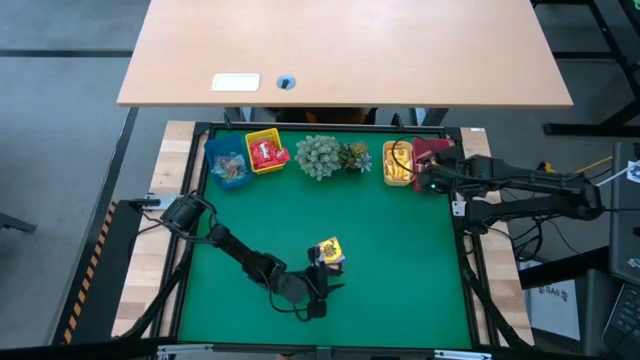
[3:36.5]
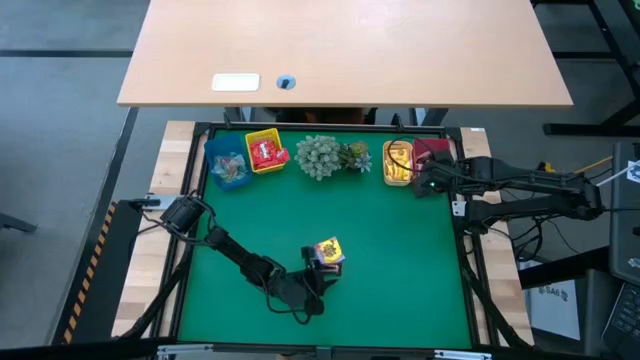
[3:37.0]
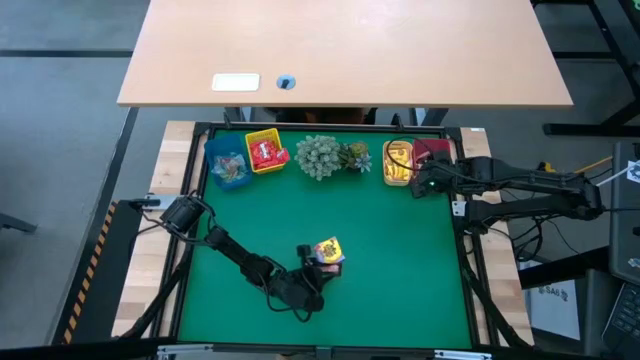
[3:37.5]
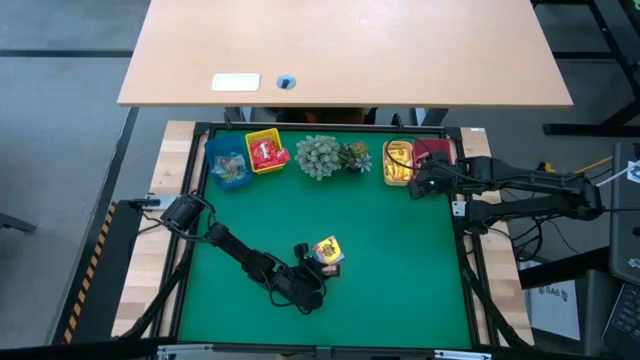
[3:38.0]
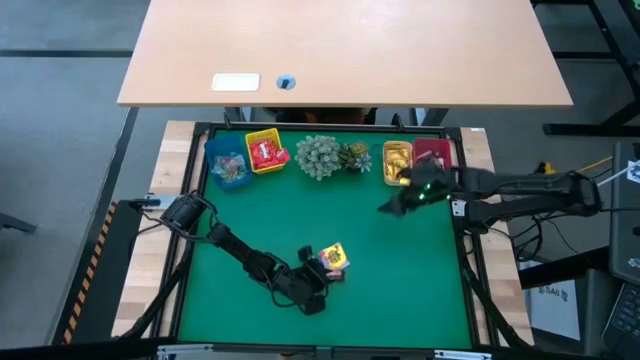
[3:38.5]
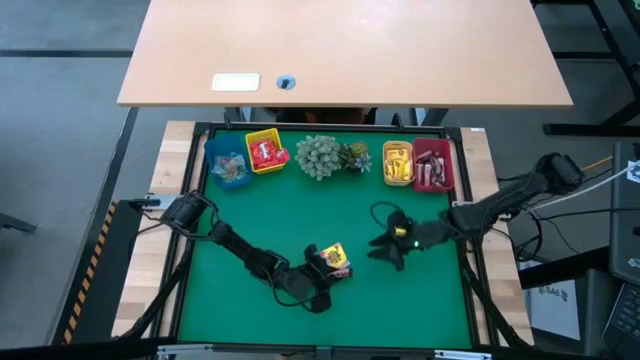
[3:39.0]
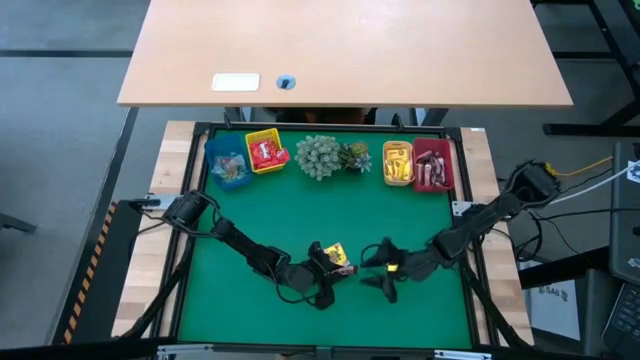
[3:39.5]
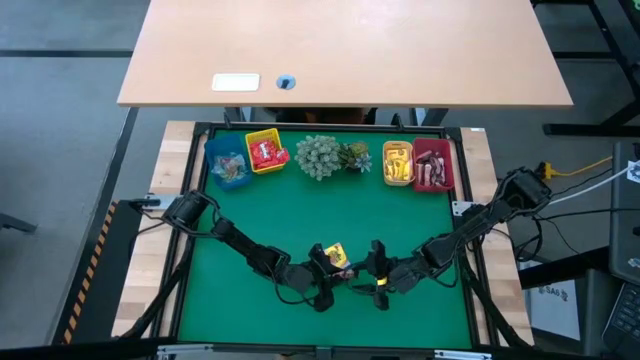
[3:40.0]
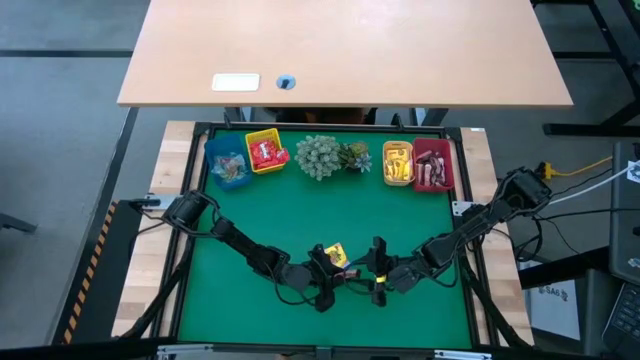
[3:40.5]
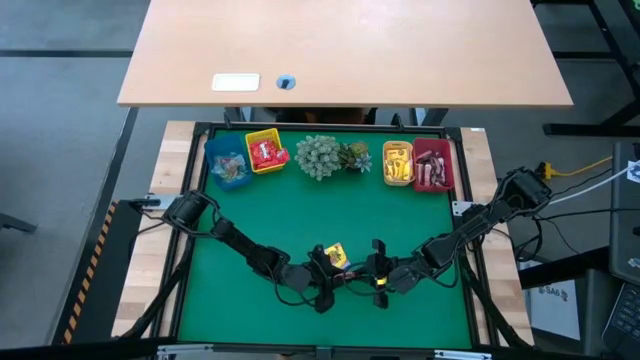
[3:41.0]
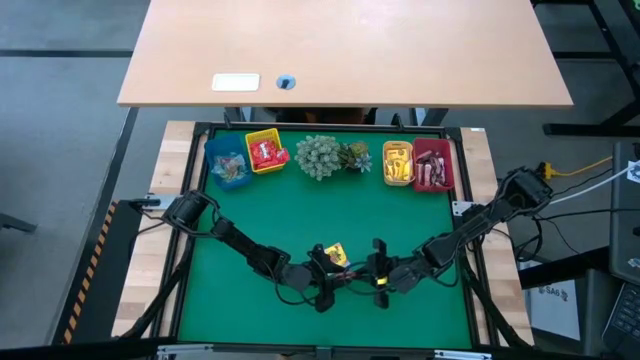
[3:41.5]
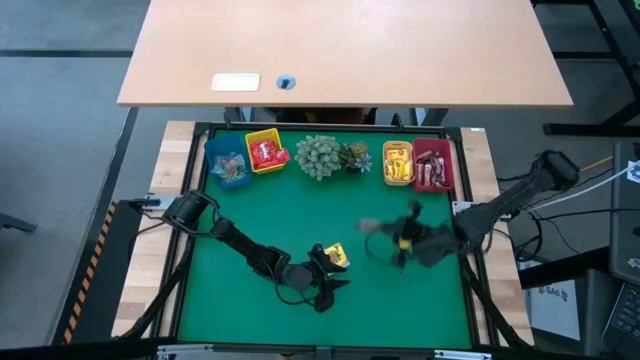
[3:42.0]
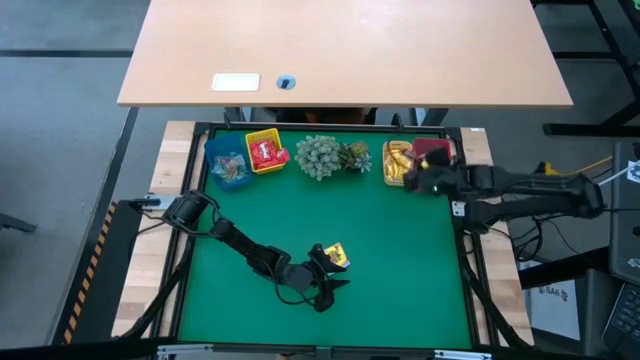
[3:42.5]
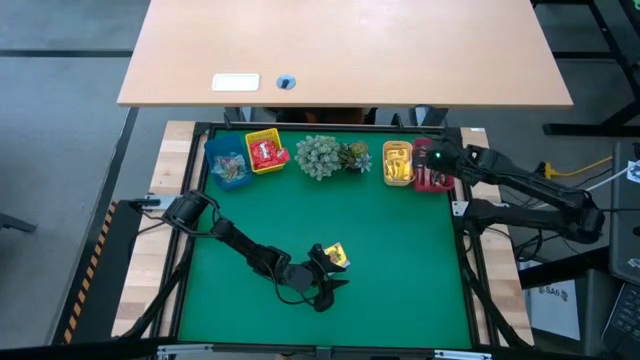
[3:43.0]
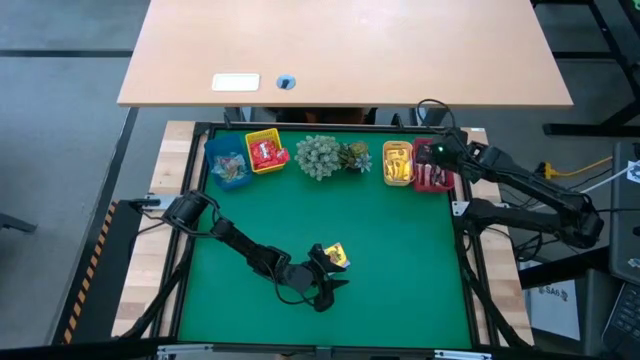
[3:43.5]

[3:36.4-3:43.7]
Task: Sort candy
Put the brown chocolate into the red bin

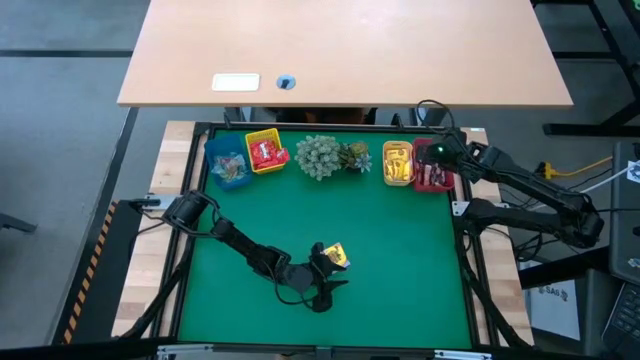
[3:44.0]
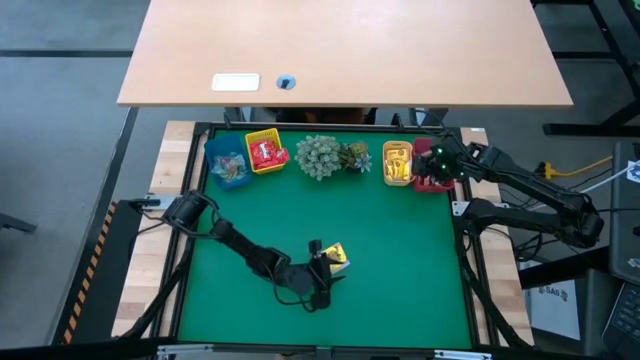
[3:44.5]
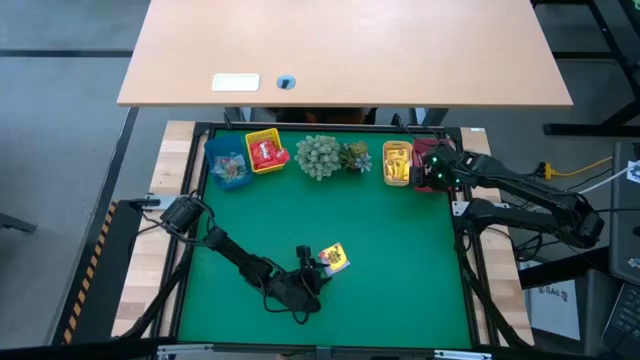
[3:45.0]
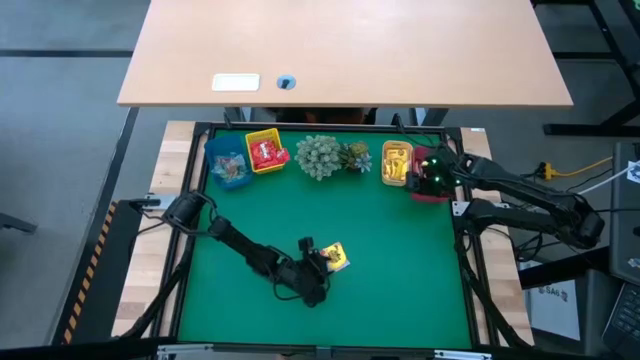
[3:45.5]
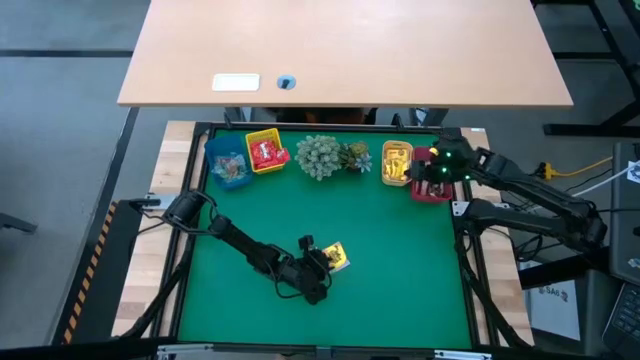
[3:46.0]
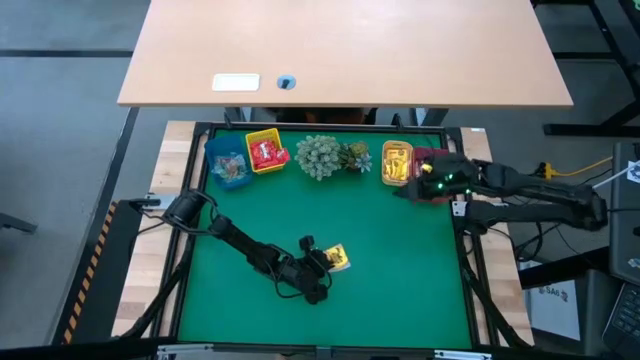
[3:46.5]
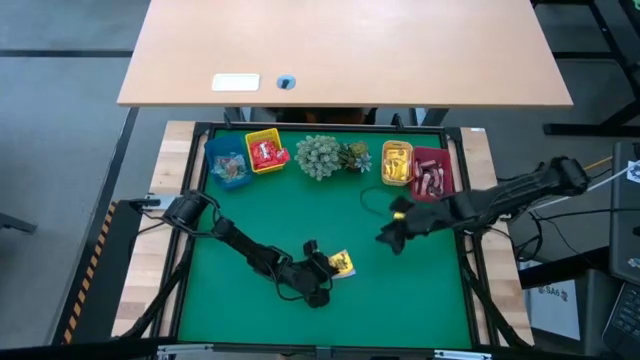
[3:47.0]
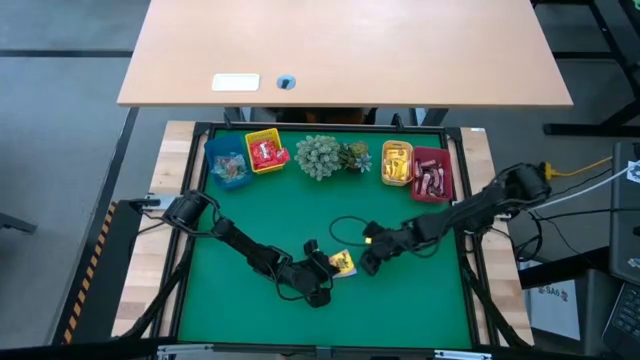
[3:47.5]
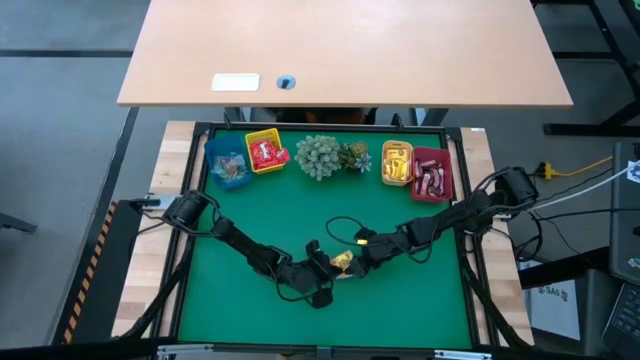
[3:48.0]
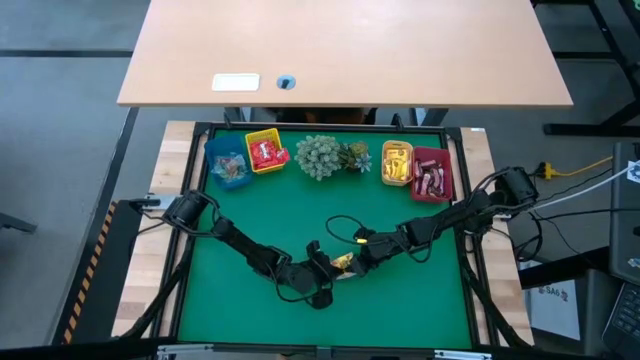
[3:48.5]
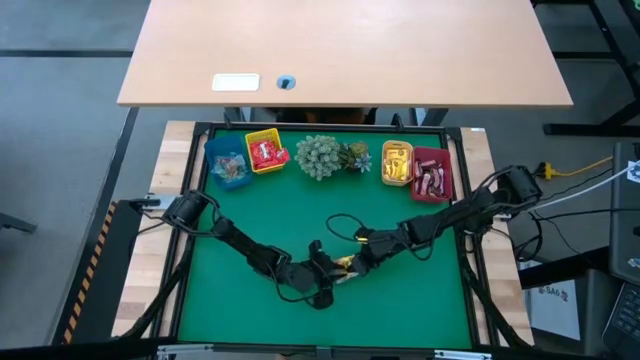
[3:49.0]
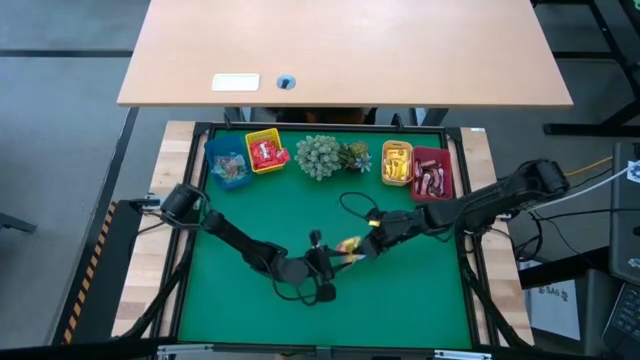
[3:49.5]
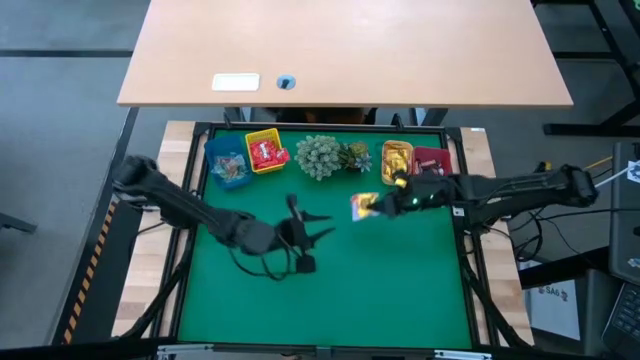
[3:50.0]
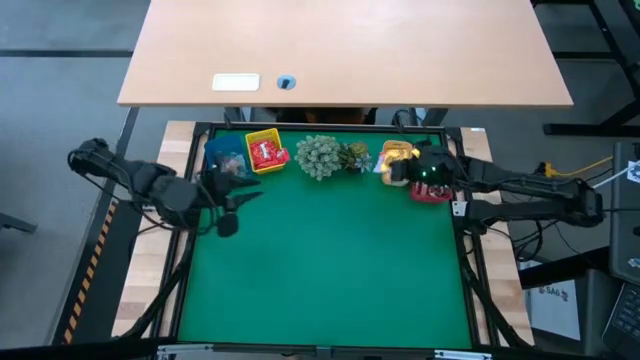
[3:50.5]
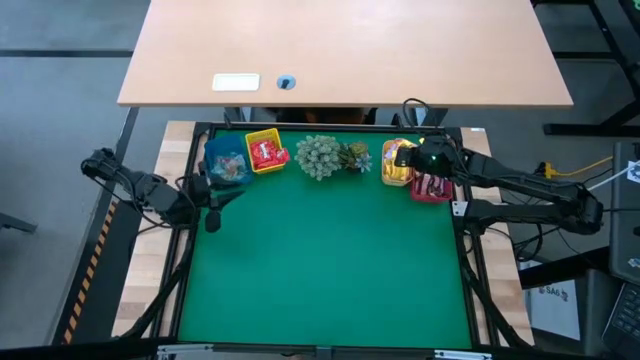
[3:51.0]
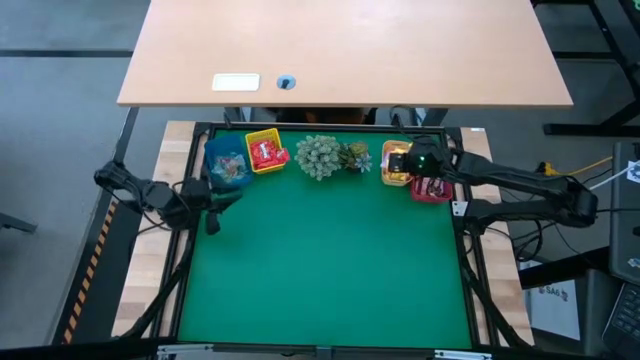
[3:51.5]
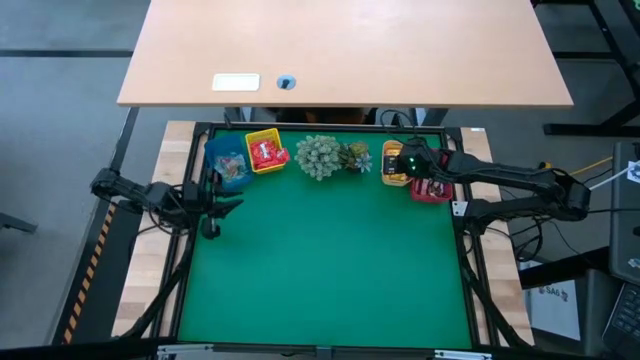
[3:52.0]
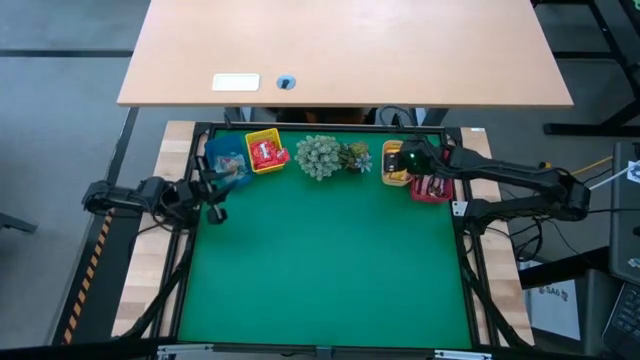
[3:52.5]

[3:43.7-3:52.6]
Put the yellow candy into the orange bin

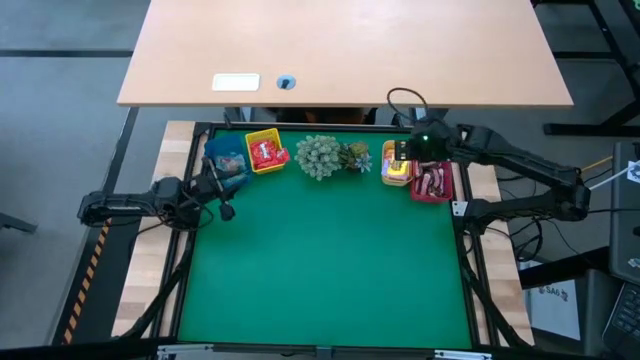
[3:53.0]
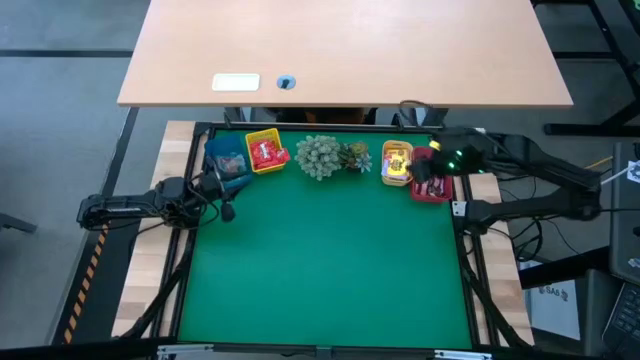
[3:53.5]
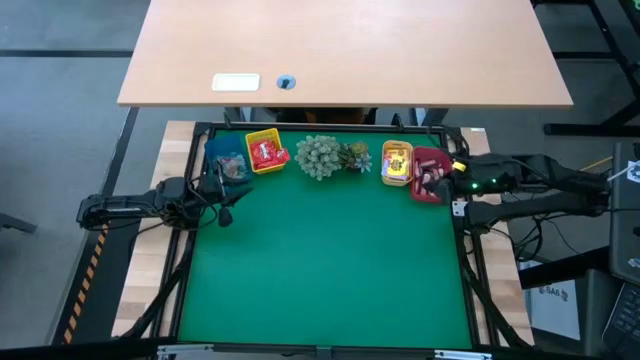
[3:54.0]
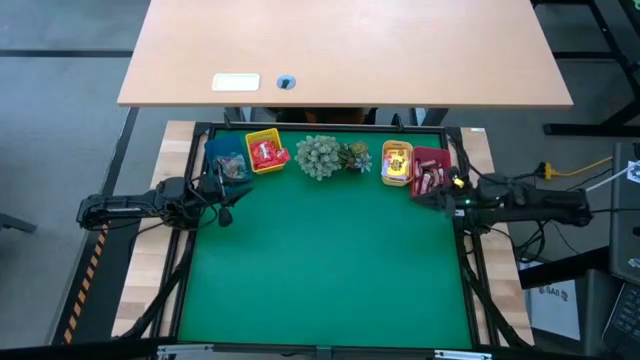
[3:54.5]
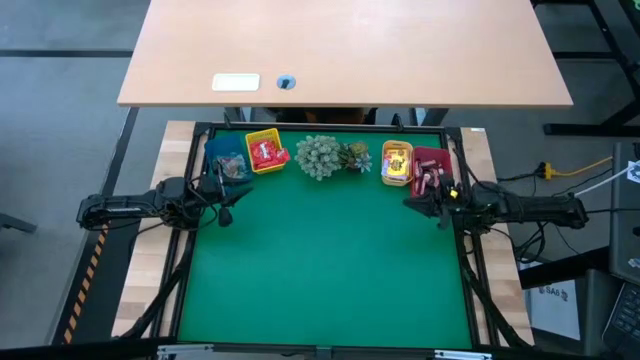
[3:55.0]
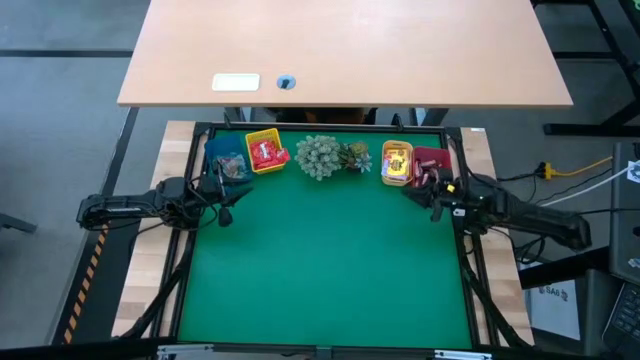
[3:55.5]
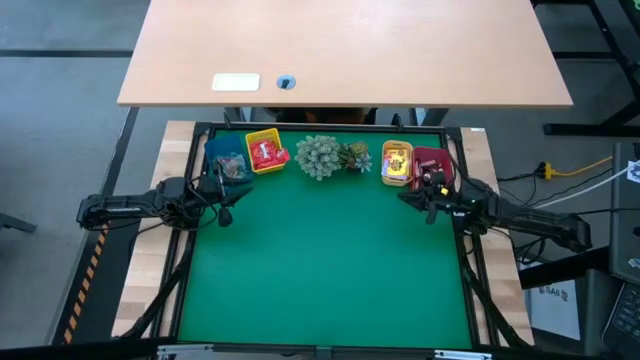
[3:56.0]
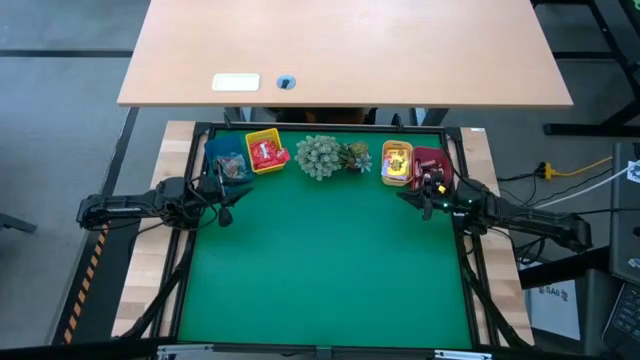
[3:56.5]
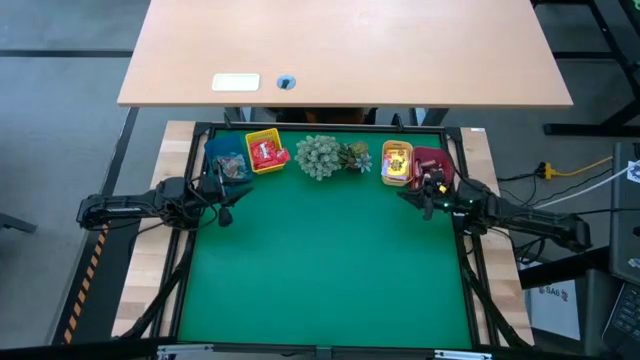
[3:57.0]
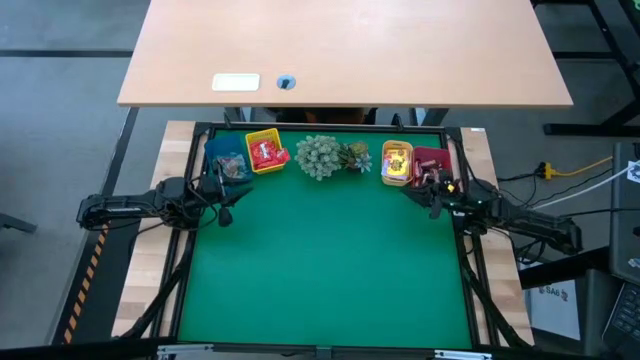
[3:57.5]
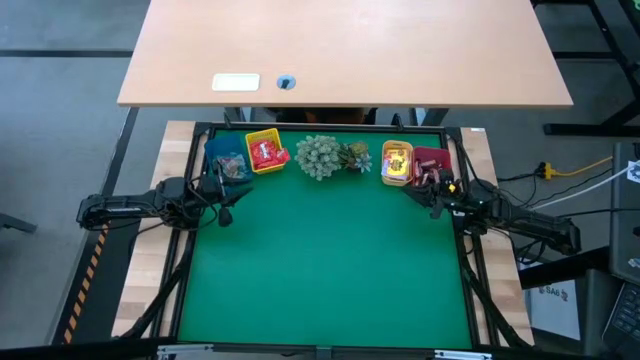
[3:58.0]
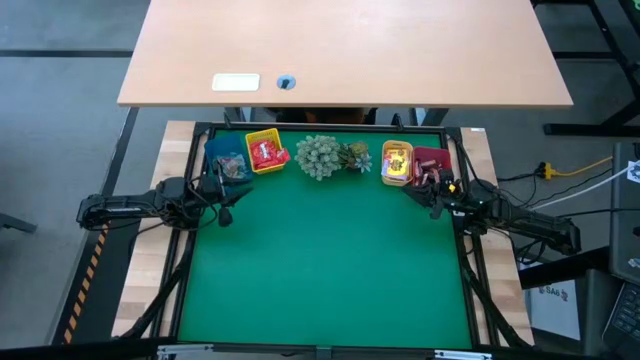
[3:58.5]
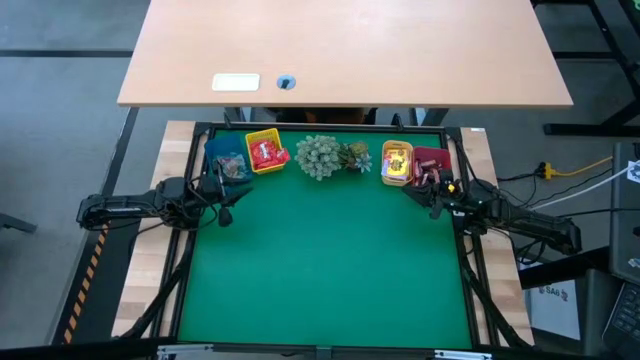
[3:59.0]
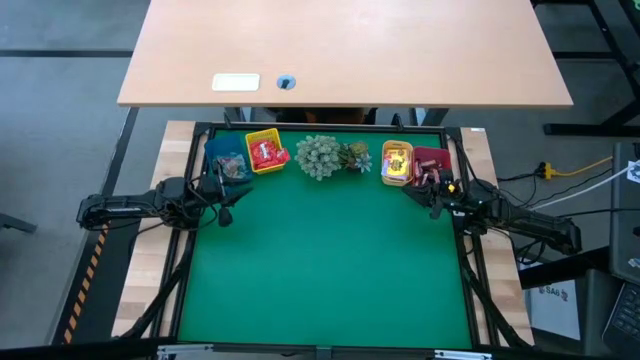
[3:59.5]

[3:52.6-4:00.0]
Return to Home Position
